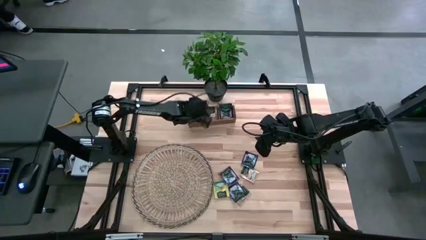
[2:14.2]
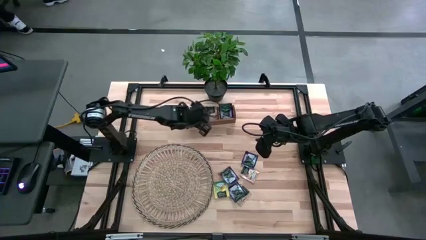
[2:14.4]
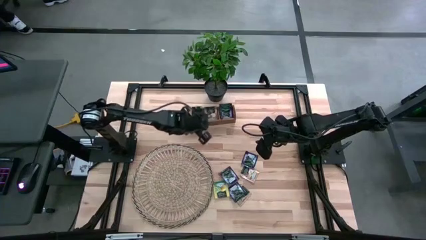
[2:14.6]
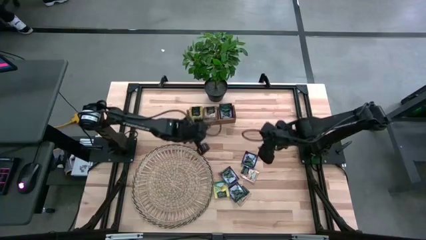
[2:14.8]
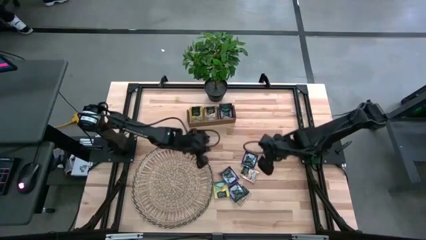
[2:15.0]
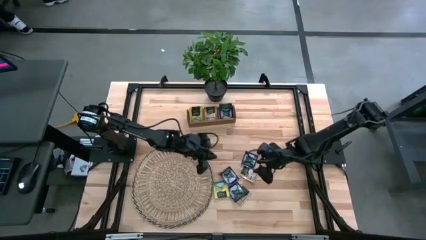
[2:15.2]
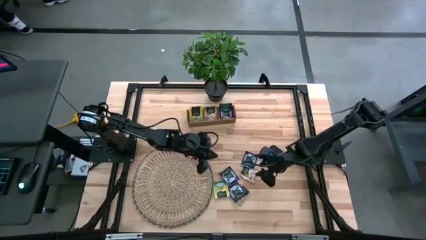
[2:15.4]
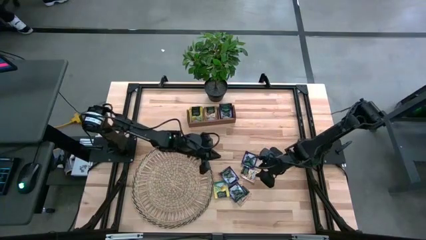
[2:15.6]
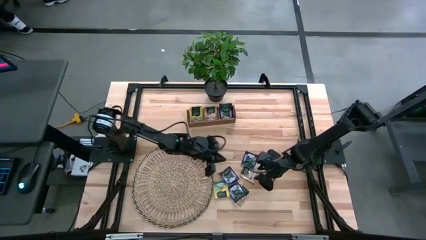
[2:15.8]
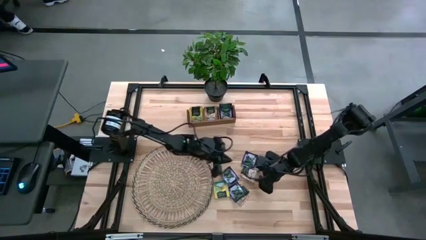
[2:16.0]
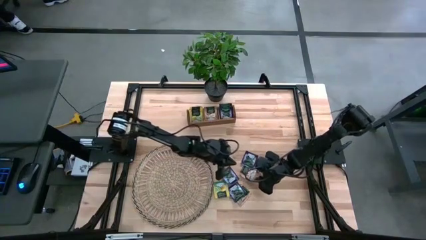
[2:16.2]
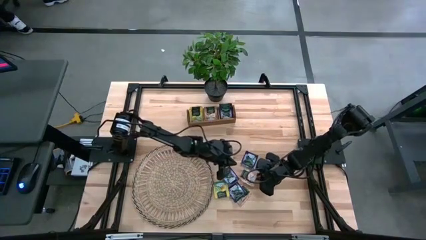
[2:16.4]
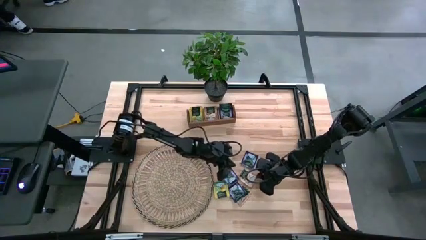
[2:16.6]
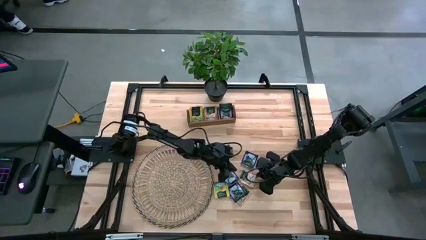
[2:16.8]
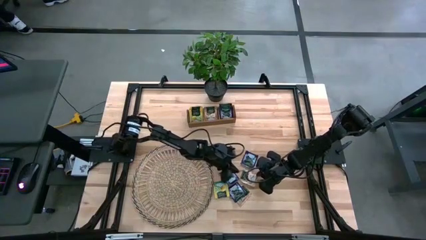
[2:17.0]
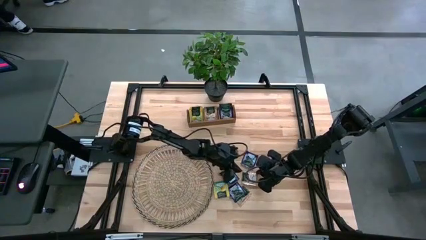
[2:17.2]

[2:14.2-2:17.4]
Task: Pick & Place Tea
Put the brown tea bag into the middle section of the wooden organizer

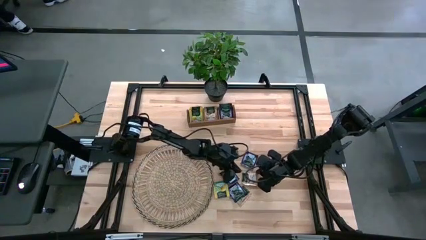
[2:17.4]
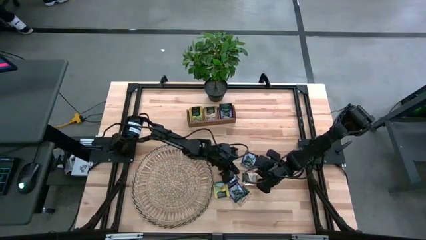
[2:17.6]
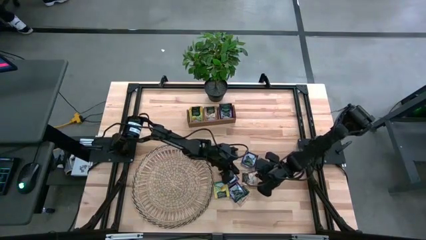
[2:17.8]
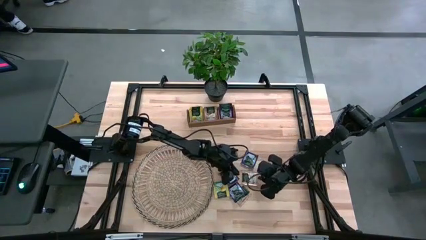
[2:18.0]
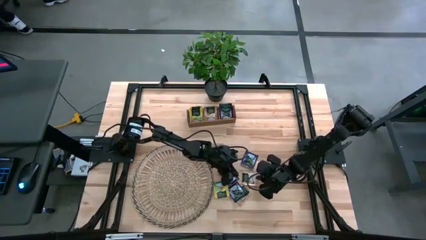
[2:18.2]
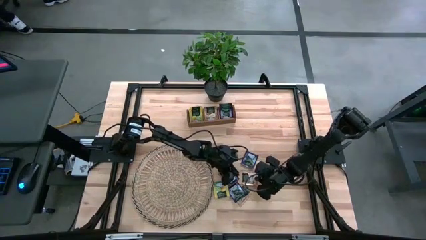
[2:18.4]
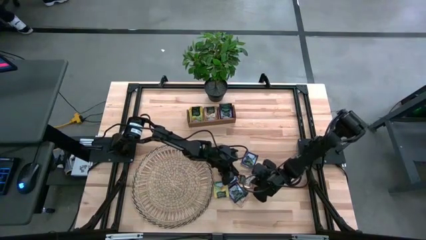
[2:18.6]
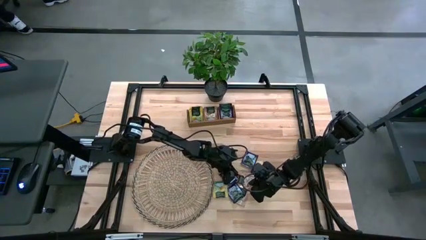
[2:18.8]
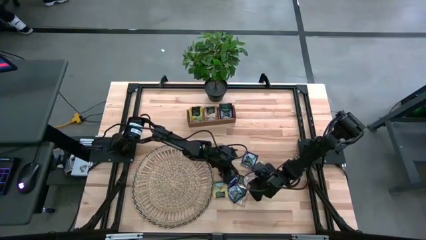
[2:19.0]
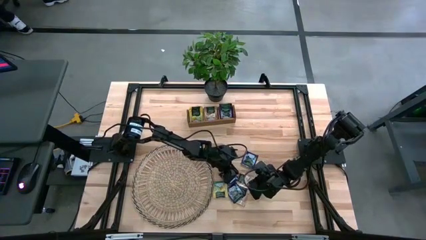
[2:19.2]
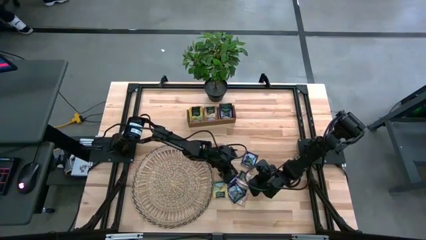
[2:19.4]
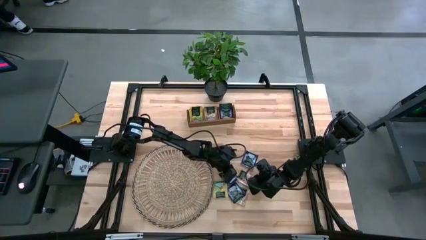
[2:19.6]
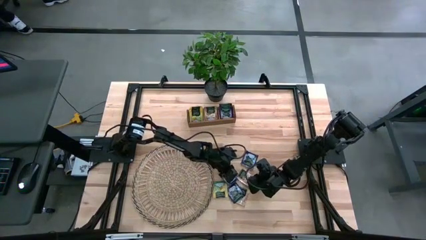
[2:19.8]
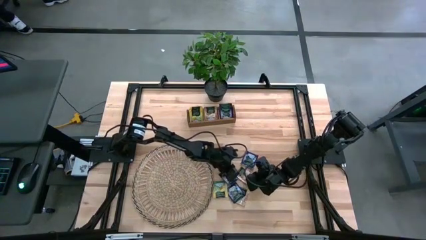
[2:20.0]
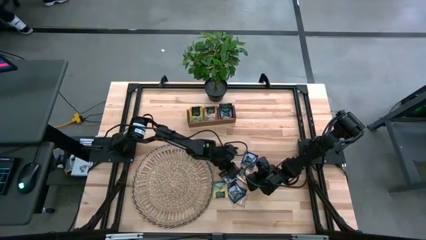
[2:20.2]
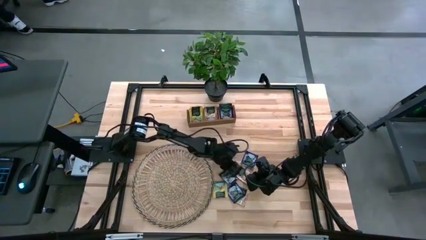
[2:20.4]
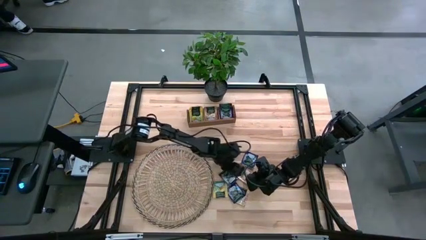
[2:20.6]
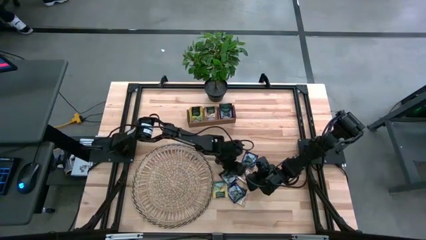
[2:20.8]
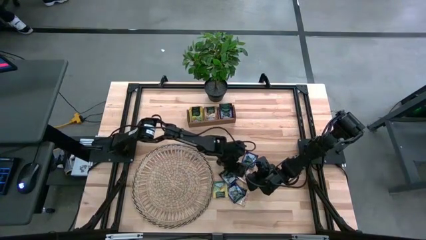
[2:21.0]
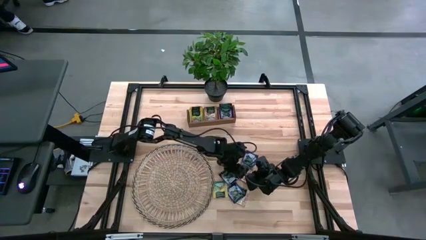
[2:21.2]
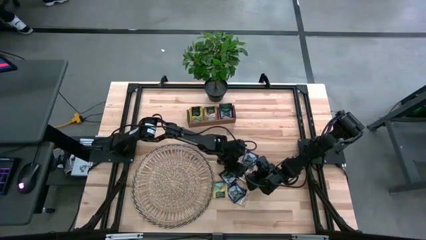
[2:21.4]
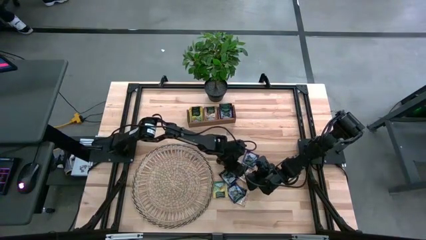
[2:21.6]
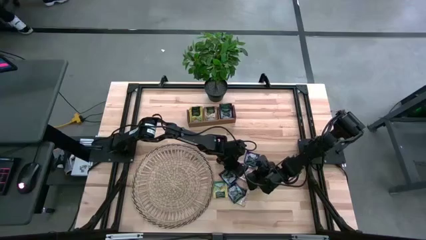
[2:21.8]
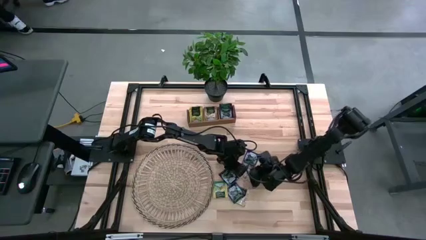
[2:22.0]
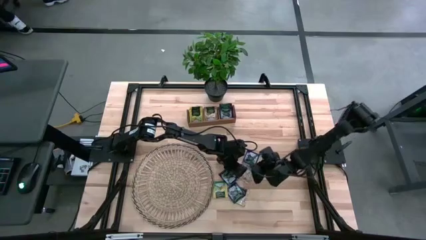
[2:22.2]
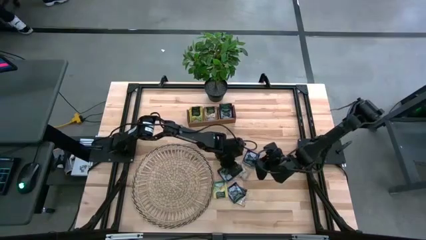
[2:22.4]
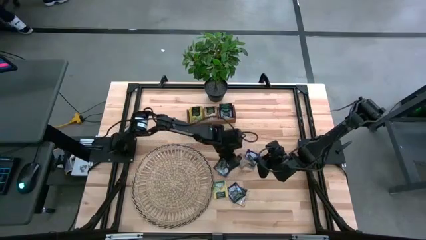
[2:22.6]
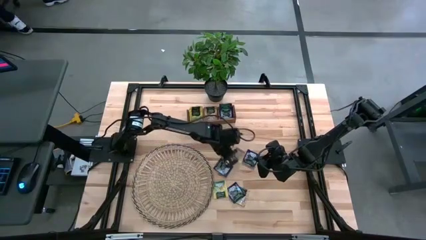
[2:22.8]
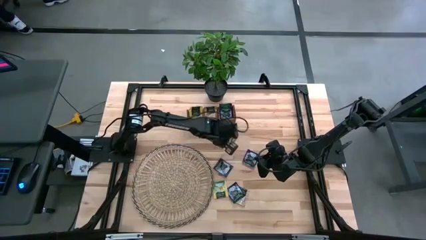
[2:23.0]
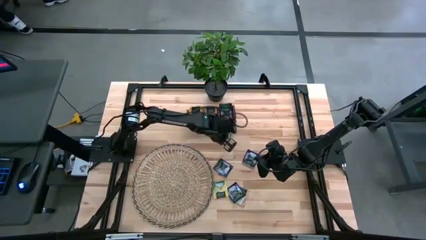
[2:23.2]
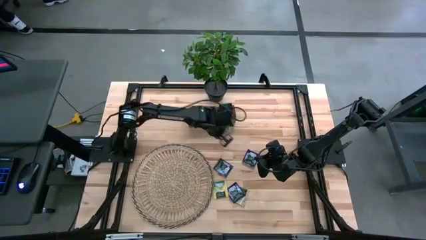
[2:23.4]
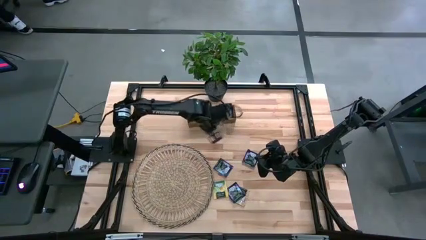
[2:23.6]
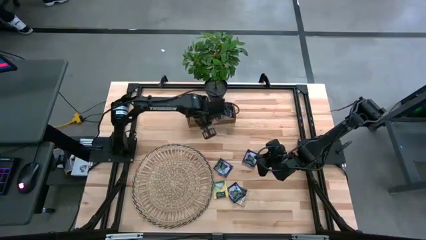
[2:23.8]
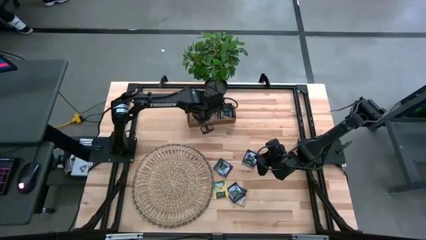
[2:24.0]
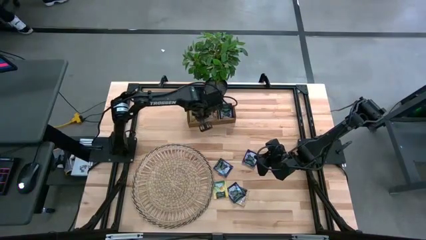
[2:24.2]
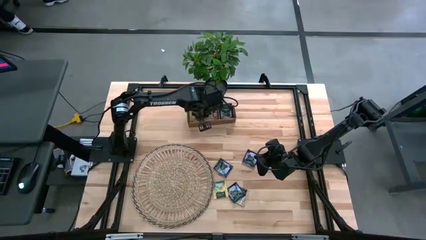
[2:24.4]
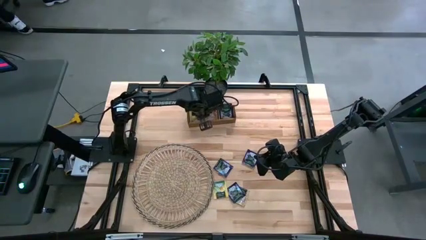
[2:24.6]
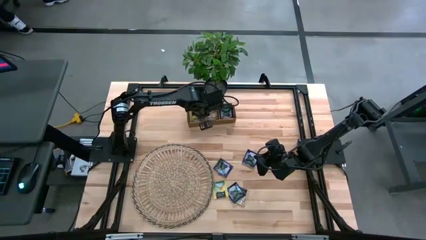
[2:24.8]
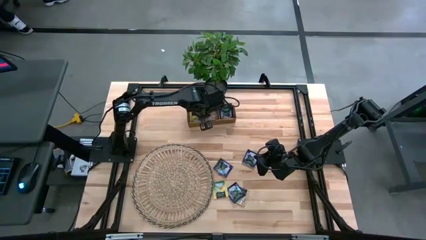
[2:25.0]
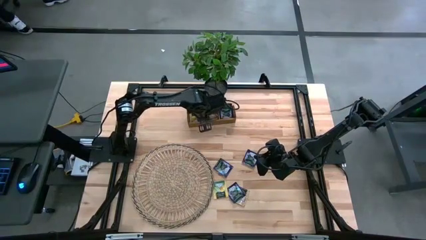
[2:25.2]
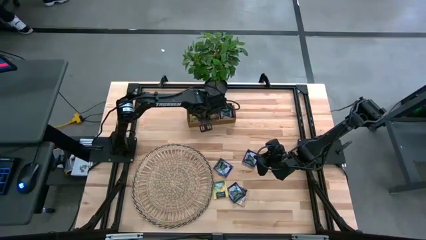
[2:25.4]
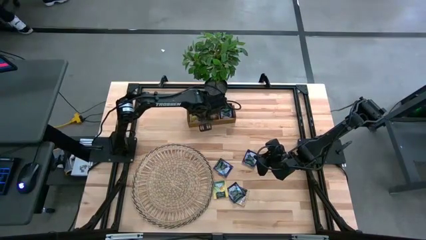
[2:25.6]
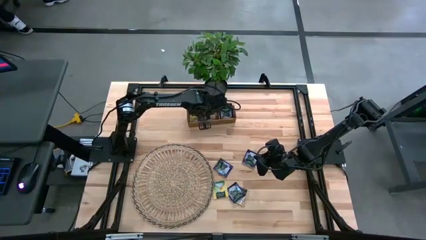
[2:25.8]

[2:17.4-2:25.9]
Put the brown tea bag into the middle section of the wooden organizer

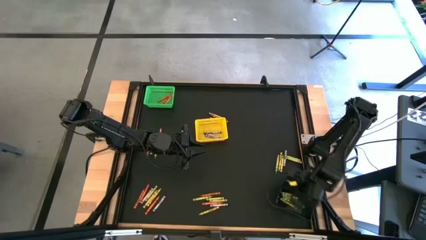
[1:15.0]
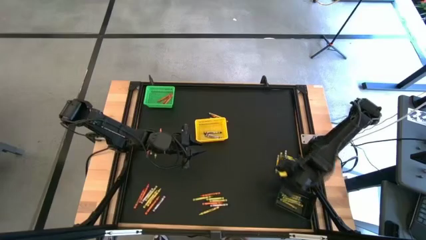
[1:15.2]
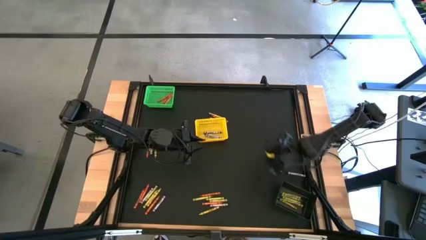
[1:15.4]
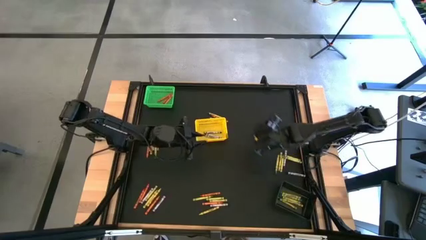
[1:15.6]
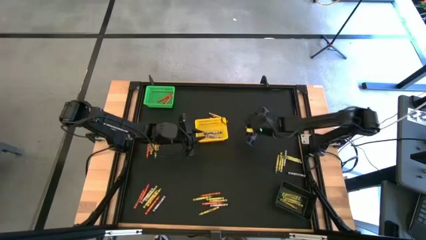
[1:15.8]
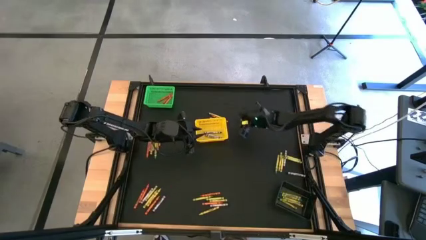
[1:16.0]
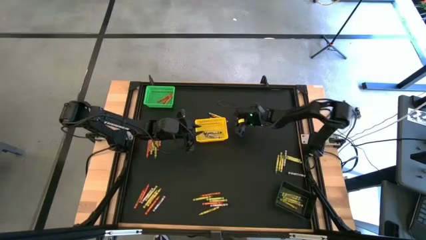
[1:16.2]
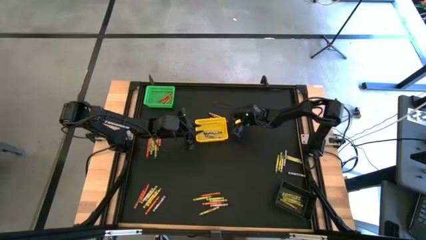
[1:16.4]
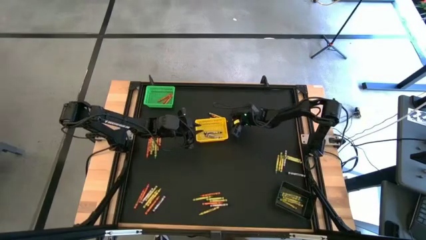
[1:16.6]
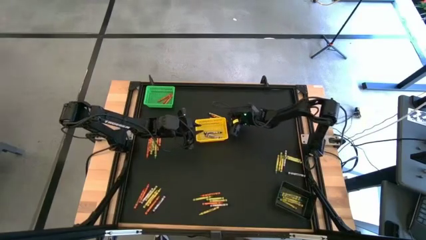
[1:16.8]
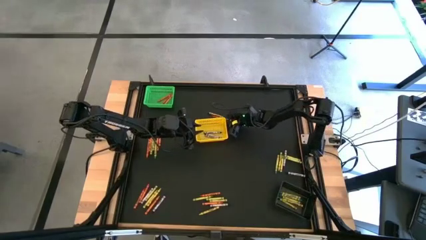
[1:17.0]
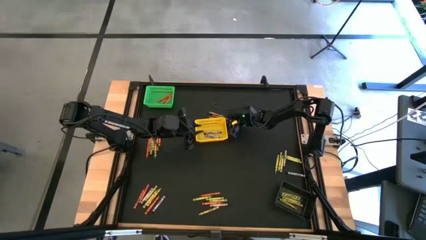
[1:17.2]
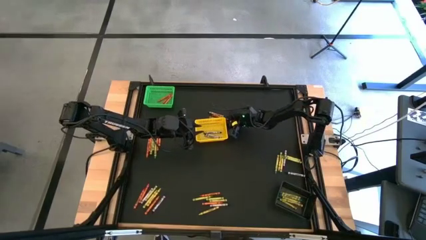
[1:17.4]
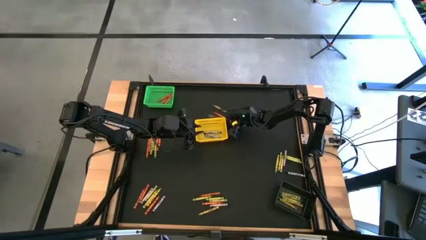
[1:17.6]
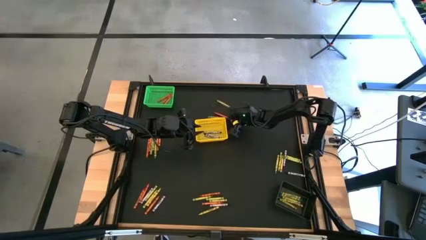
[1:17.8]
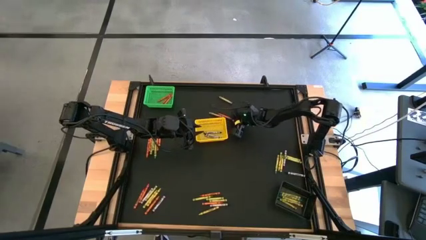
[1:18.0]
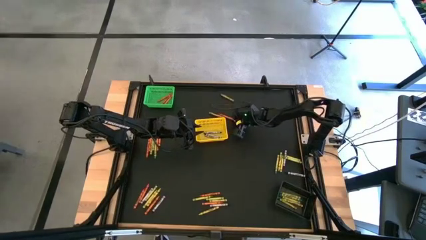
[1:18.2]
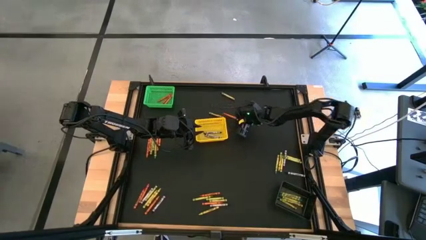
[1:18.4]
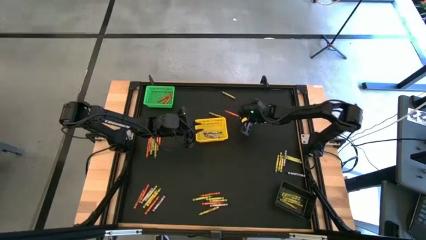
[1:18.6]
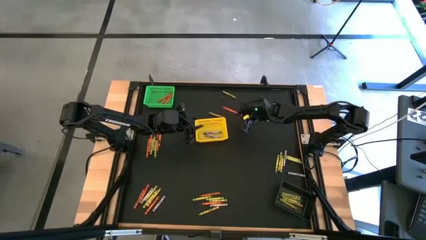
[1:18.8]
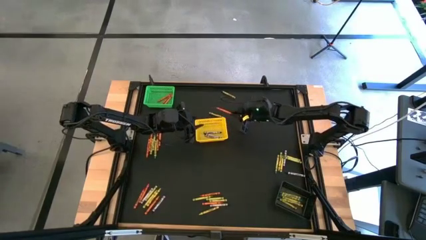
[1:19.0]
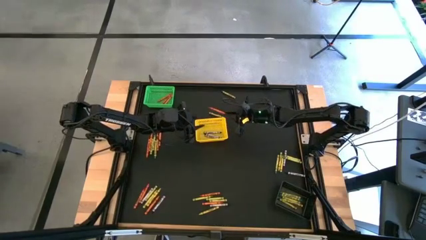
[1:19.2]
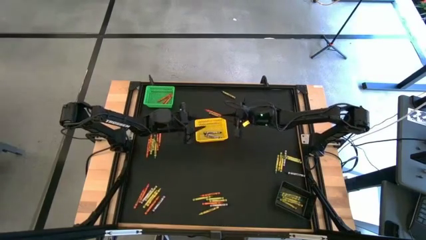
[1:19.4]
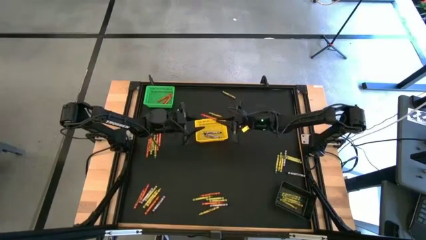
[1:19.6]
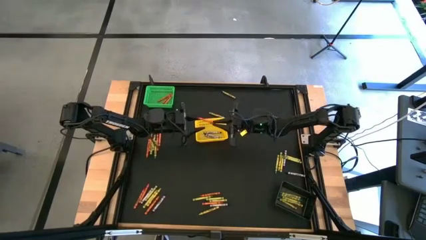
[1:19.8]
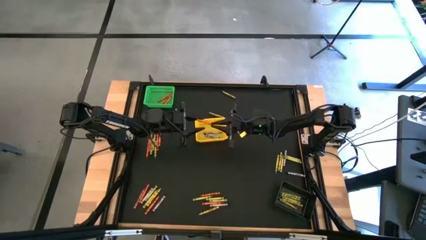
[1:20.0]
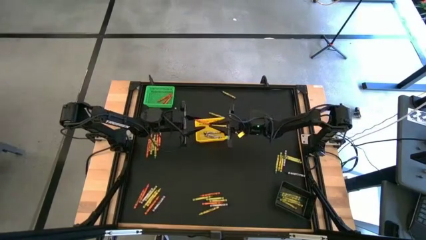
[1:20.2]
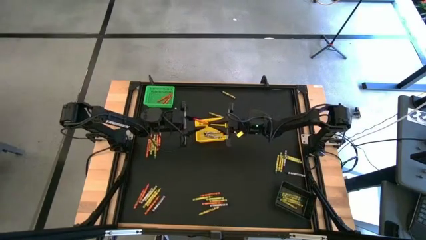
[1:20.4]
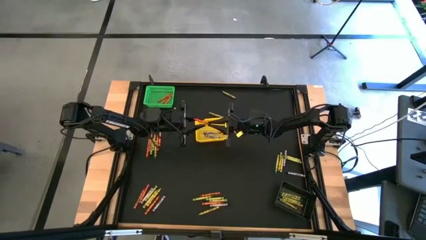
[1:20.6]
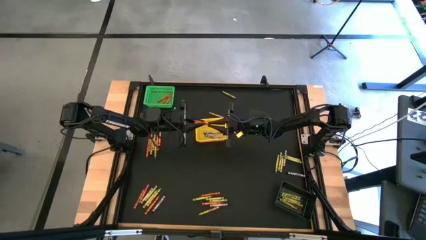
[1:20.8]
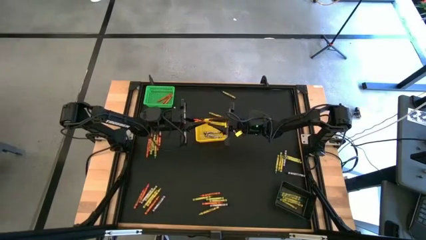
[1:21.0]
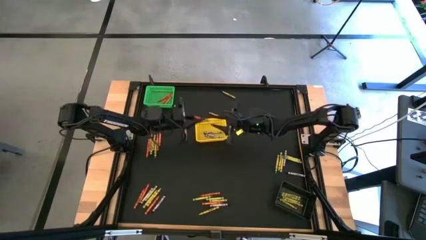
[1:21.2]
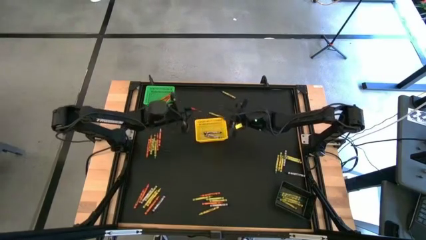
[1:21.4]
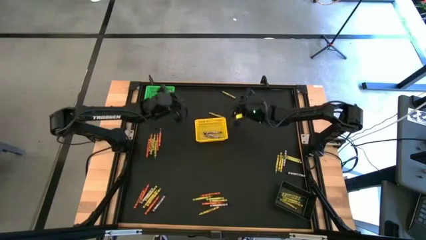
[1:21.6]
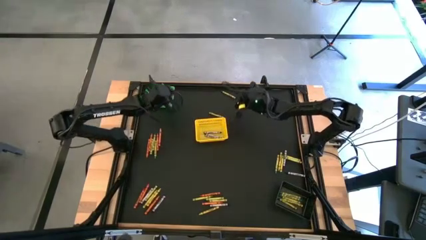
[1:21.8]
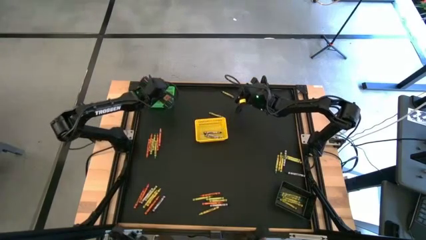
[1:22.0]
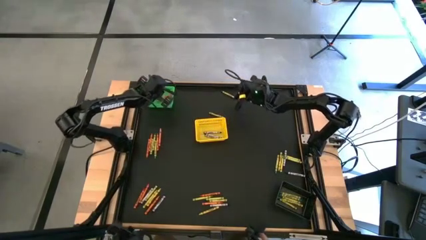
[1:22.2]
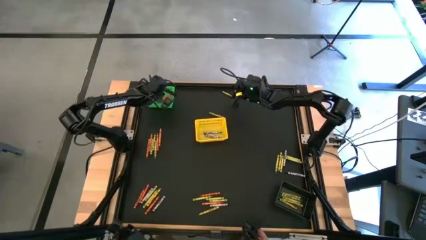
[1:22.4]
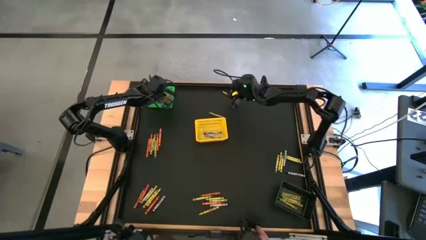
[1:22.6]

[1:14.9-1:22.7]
Task: Sort crayons
Put the orange crayon into the green bin
